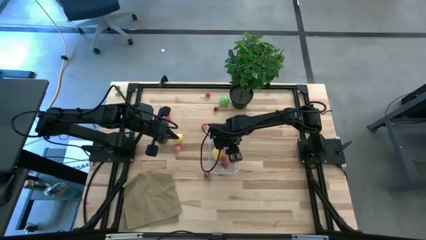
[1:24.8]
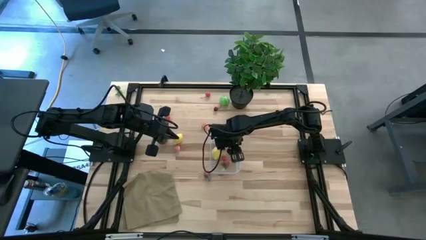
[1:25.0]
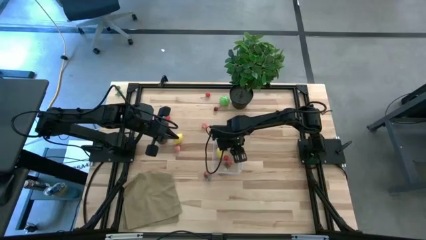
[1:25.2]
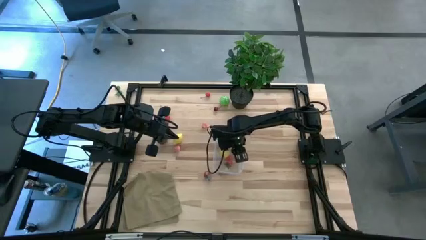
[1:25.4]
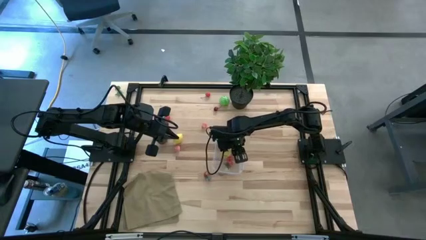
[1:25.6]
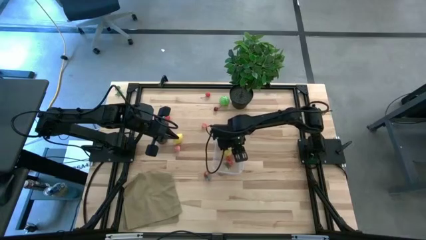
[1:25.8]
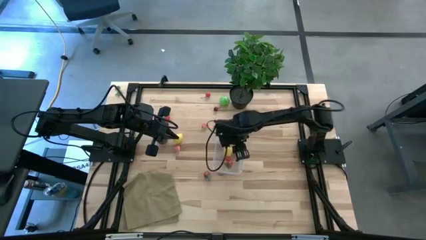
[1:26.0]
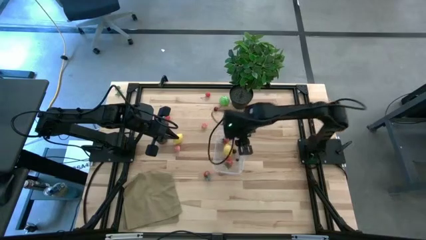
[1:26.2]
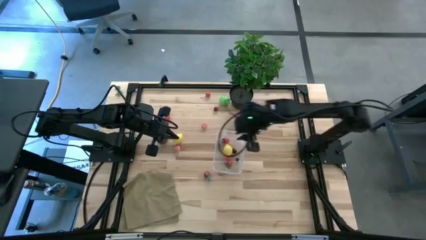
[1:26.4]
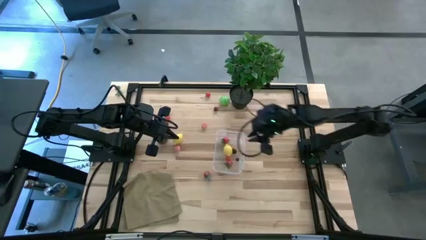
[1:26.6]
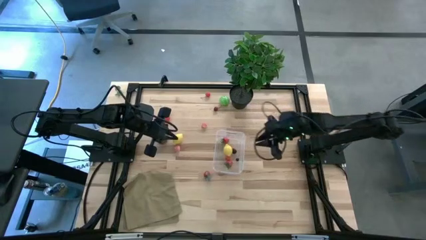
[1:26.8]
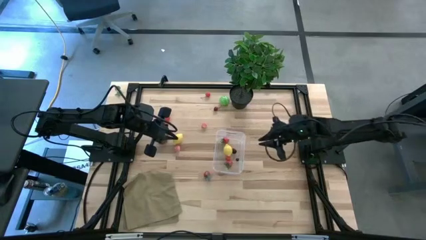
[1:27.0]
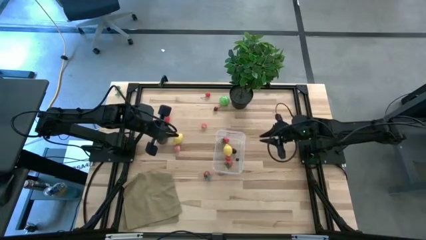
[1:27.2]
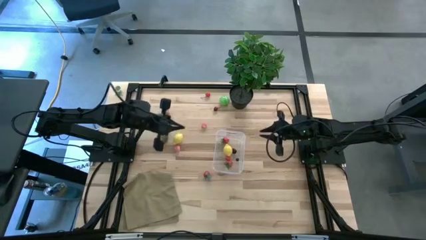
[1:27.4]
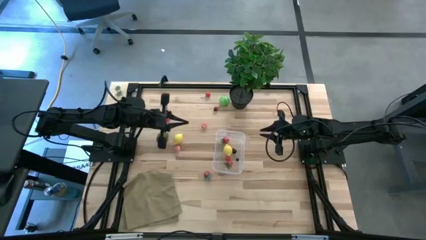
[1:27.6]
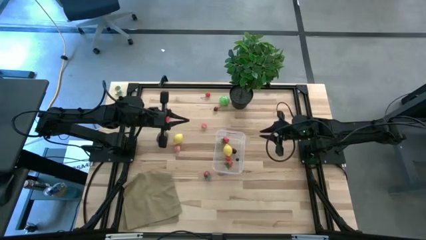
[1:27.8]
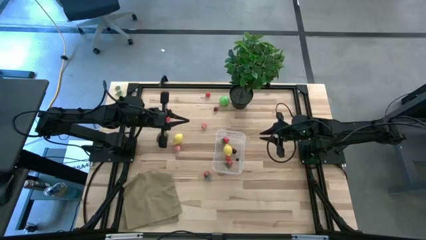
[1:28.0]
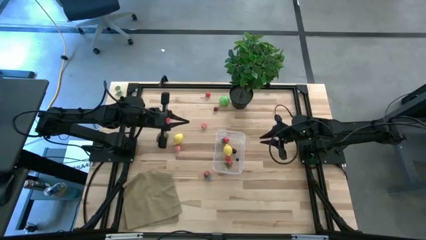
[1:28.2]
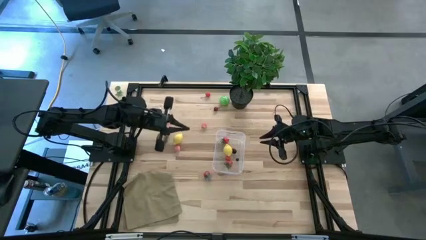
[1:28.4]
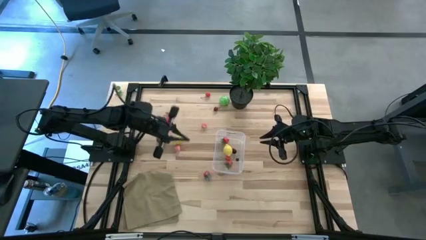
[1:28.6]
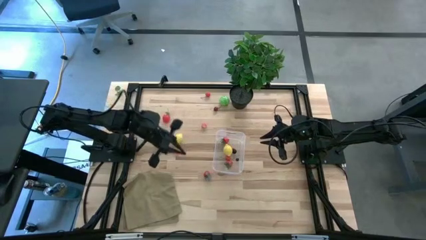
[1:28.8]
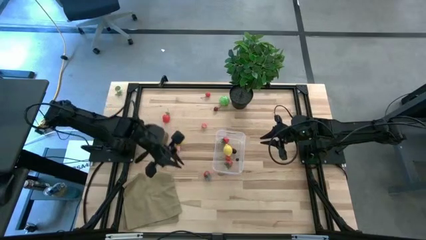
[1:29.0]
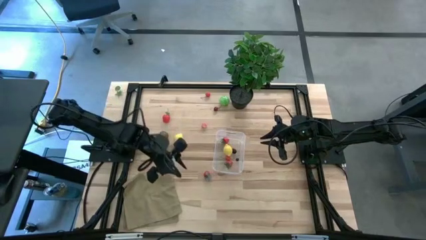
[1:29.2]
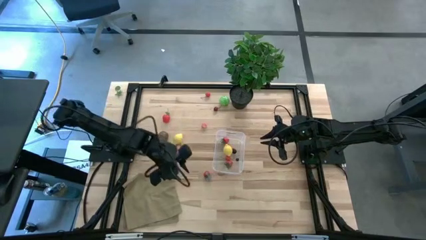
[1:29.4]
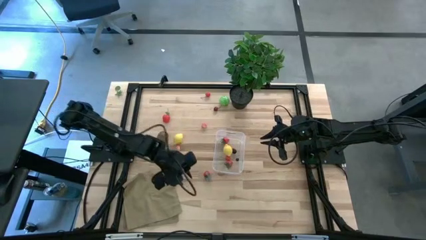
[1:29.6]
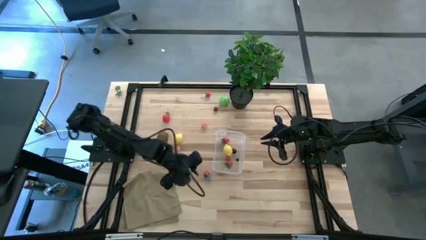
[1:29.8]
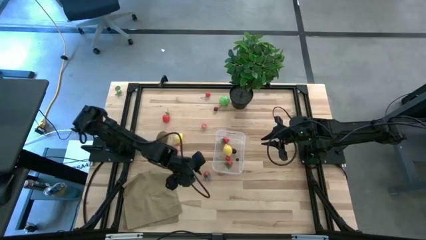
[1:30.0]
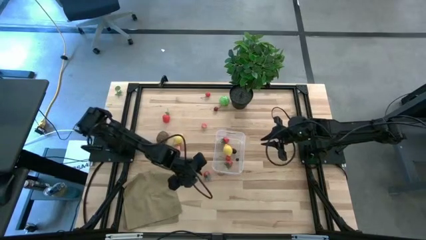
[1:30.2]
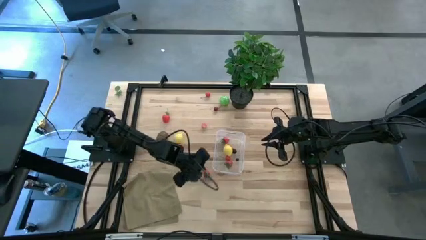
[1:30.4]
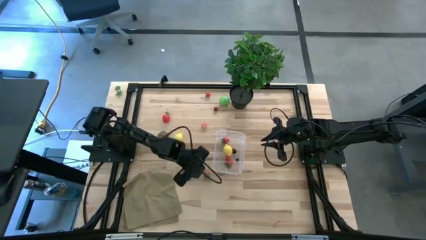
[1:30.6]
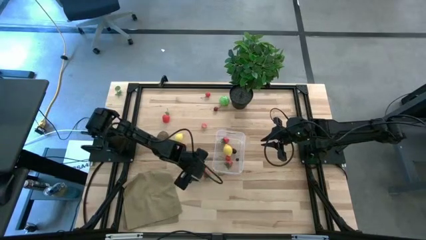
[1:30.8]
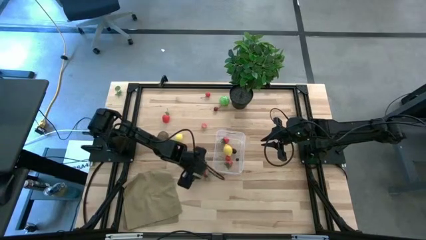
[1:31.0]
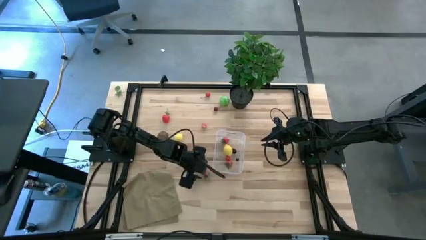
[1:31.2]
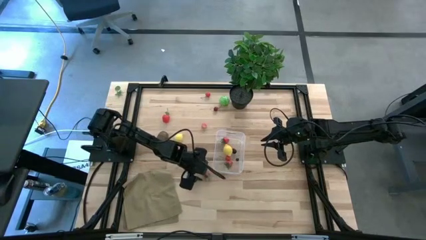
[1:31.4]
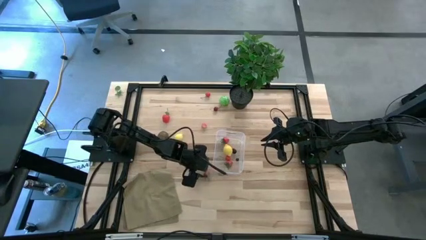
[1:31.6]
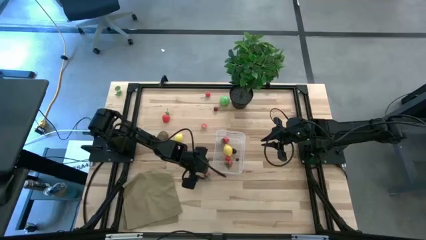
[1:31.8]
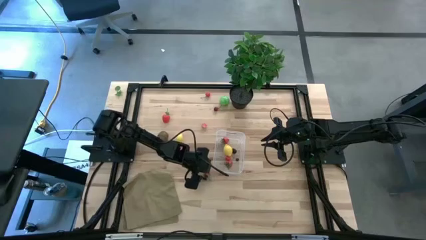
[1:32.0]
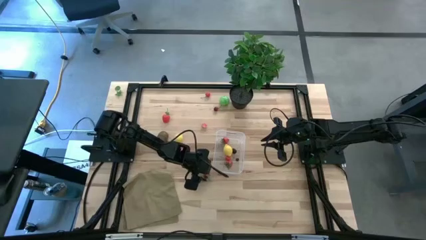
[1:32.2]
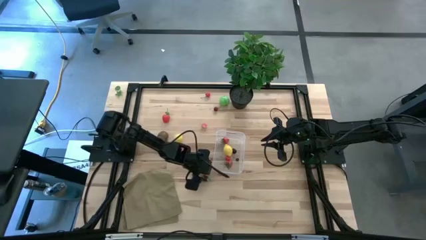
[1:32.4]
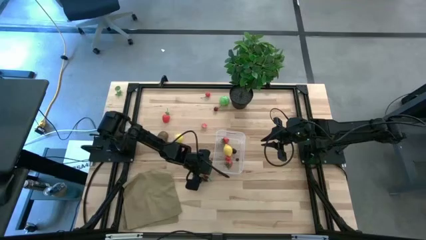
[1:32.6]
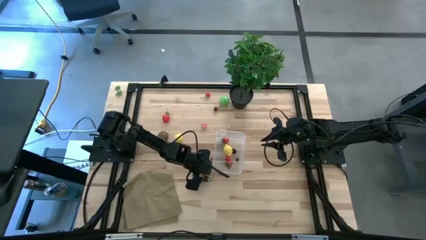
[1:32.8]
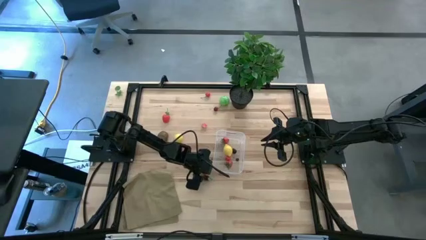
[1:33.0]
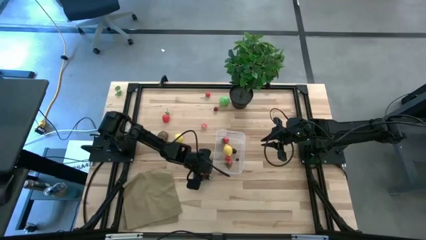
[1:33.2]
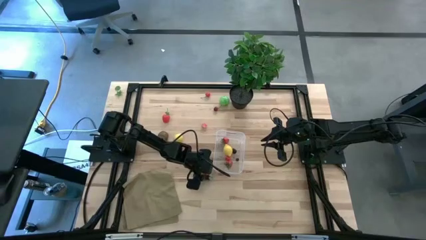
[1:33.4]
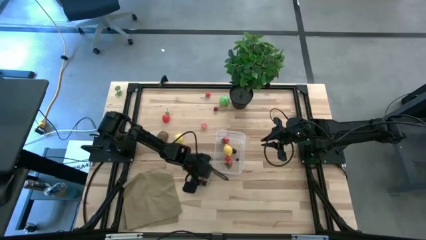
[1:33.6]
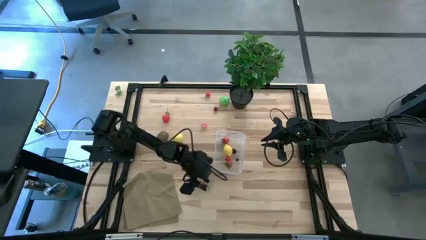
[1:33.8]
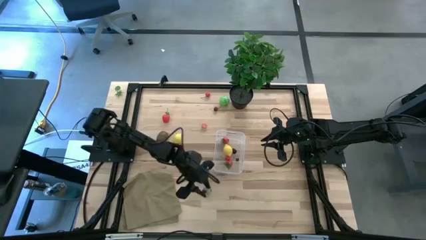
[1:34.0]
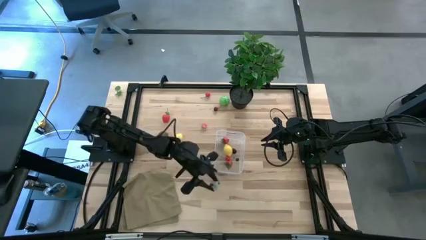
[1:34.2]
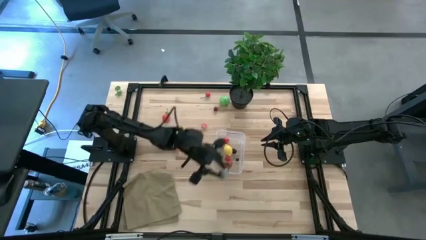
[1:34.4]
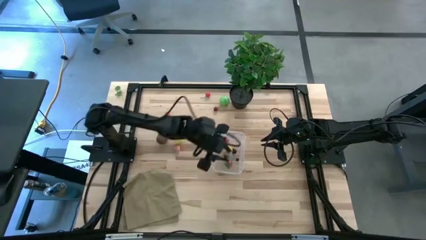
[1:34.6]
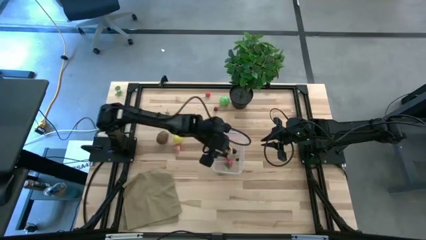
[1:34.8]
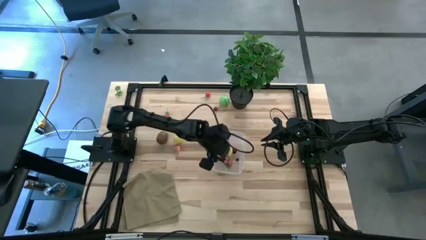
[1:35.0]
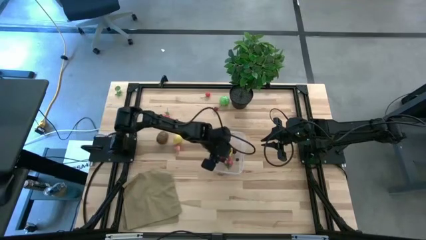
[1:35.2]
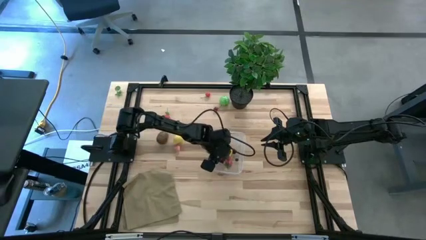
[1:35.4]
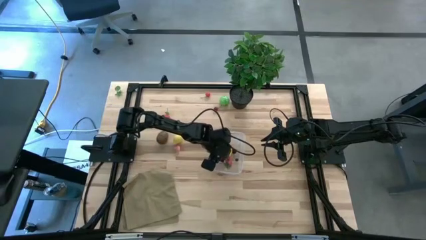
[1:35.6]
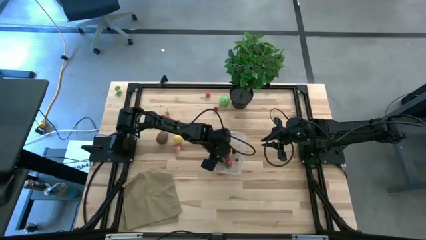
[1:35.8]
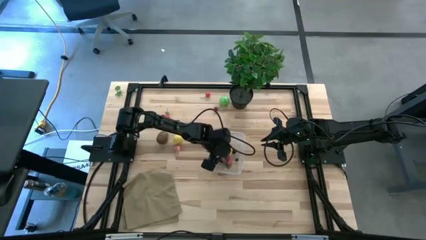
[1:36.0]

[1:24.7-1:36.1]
Task: Pick and placing Produce into tupperware
Put the red strawberry into the transparent container

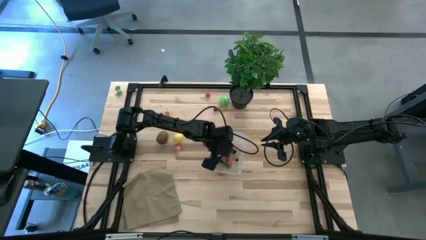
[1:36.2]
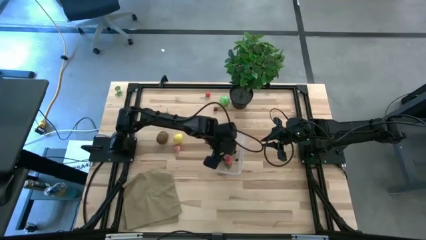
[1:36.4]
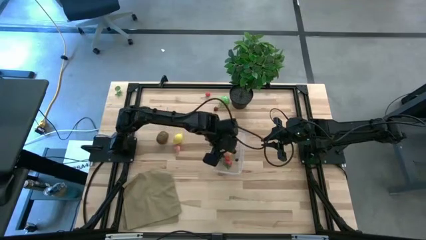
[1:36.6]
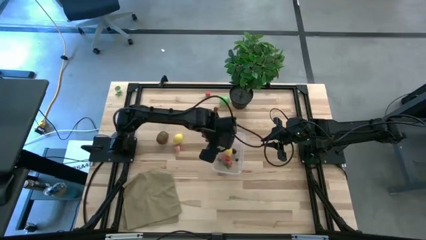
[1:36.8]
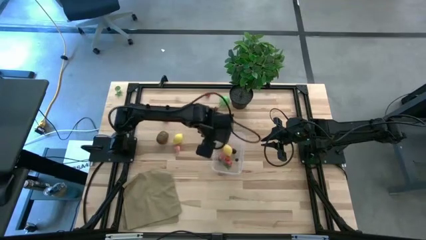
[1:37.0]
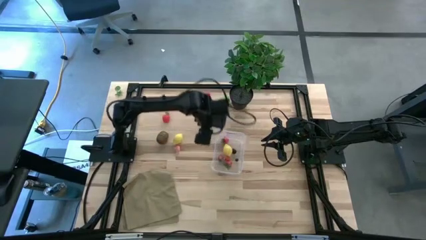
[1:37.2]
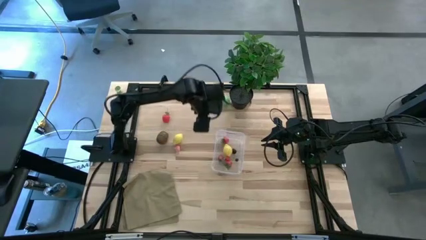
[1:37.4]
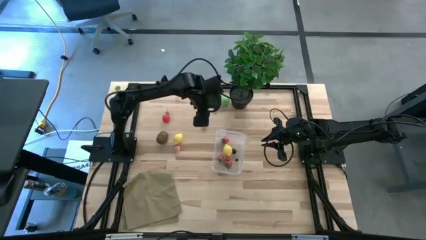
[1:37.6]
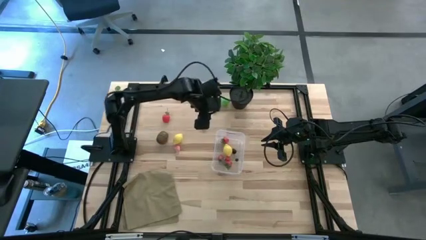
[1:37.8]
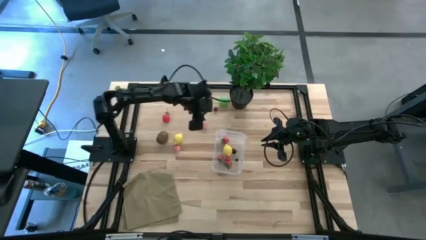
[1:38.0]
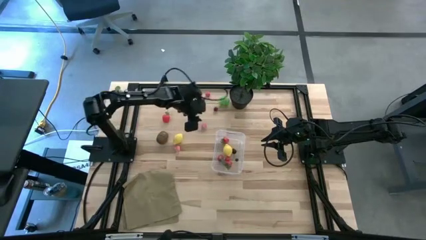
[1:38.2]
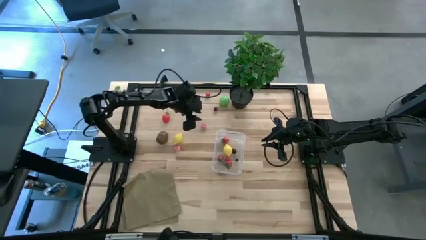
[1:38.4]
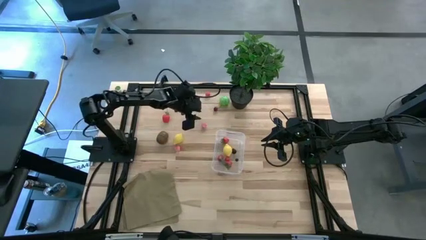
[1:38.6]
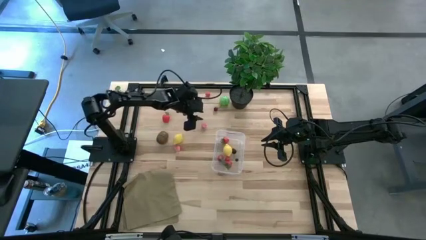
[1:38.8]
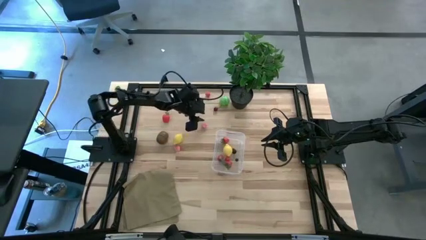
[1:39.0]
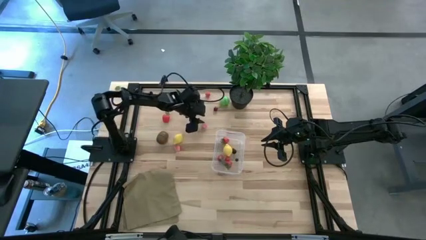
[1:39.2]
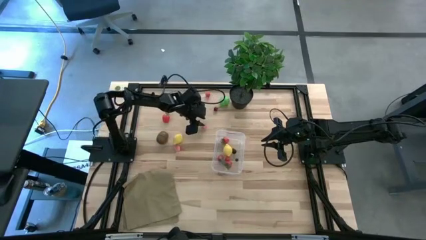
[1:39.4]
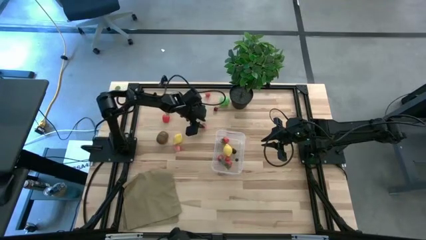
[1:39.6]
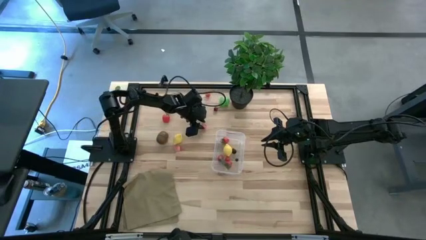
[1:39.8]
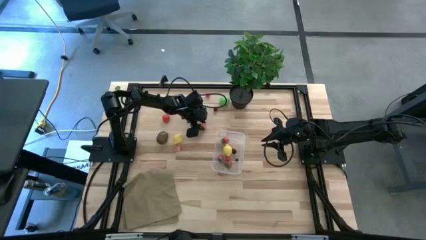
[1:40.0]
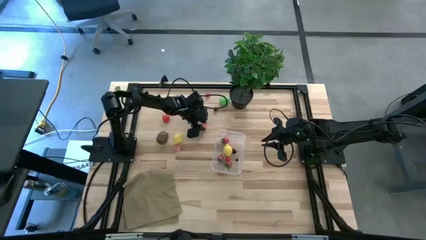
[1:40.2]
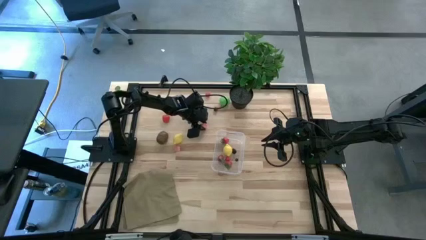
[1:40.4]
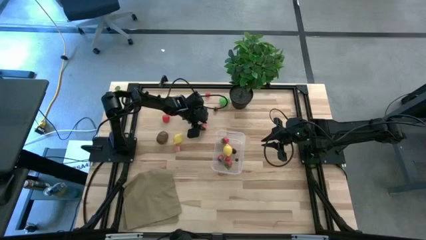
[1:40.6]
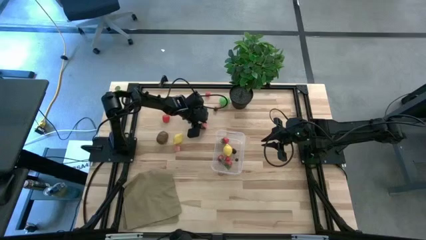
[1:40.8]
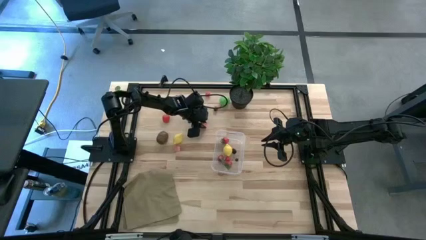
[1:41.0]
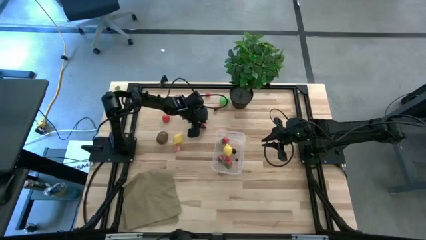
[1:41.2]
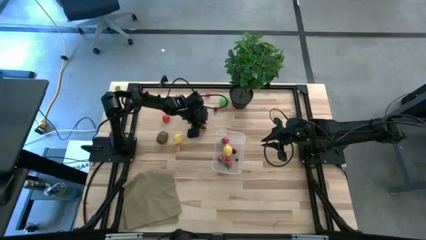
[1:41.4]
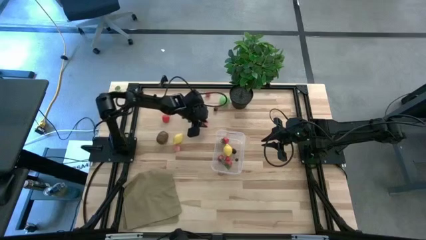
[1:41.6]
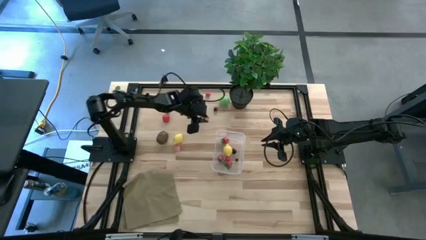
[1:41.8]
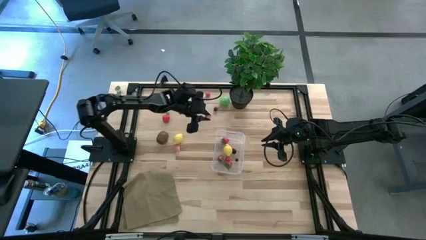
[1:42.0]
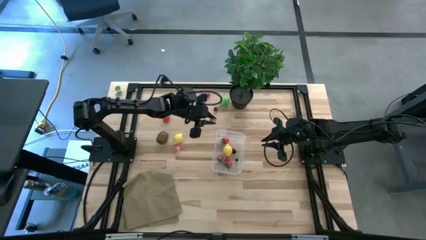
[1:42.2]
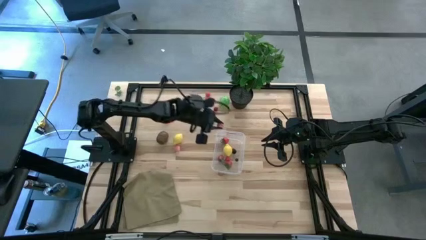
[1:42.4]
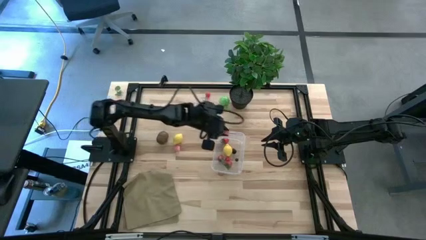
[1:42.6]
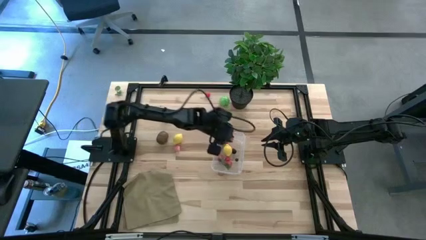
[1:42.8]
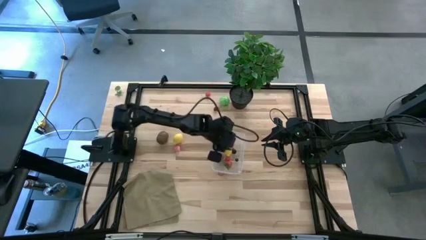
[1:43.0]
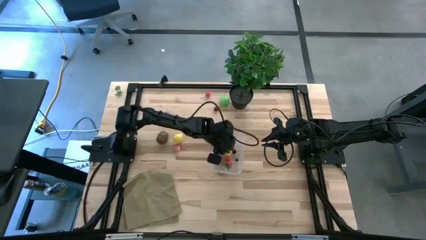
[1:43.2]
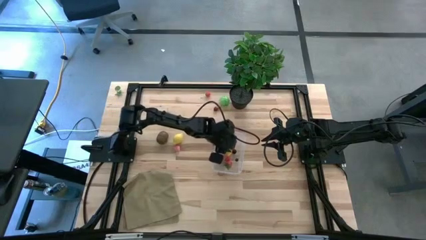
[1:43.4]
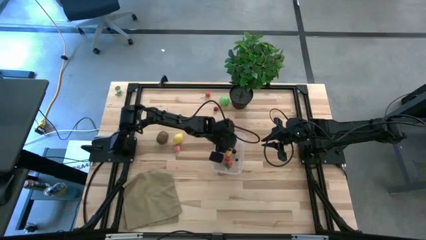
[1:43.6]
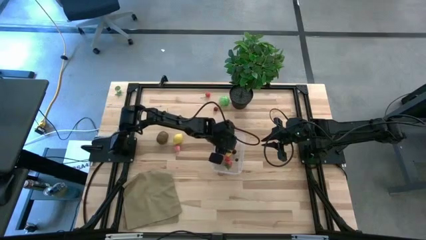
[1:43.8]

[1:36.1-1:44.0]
Put the pink peach into the transparent container
